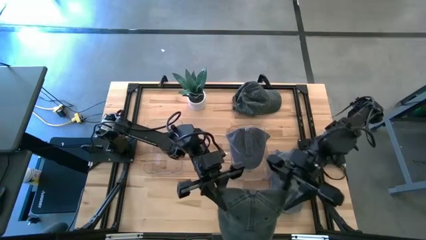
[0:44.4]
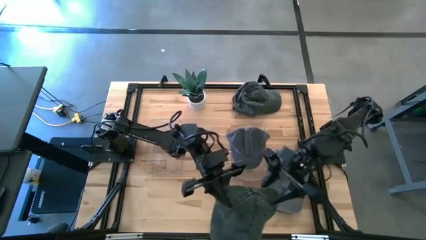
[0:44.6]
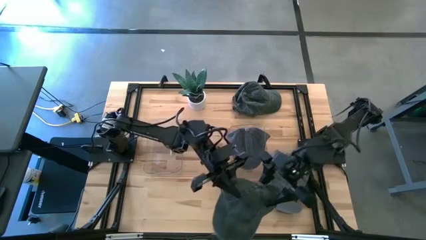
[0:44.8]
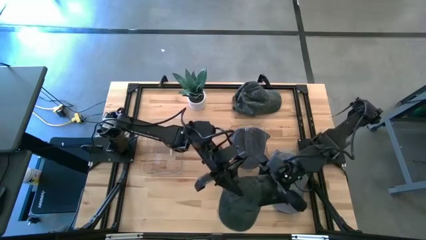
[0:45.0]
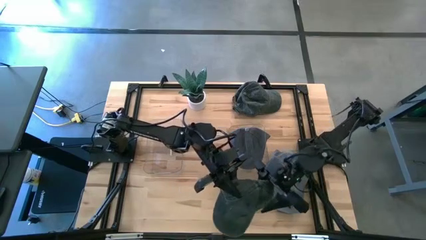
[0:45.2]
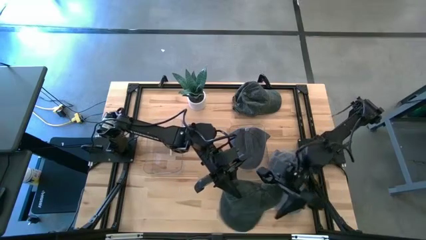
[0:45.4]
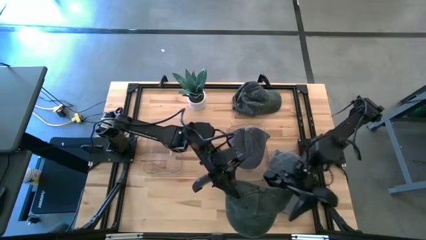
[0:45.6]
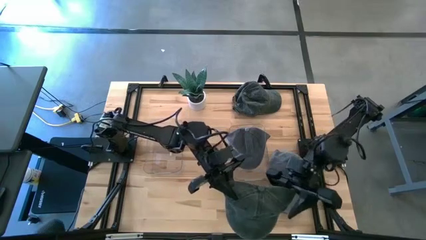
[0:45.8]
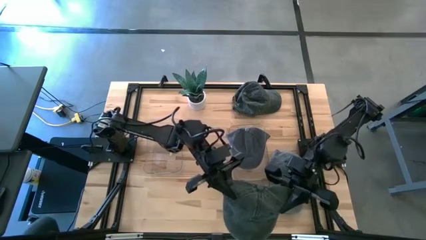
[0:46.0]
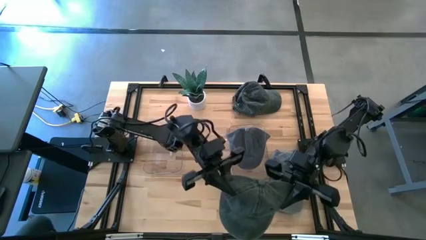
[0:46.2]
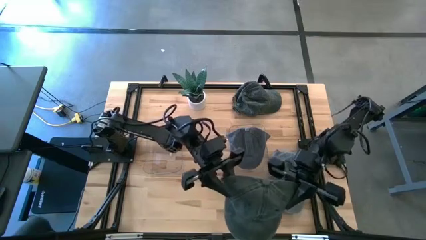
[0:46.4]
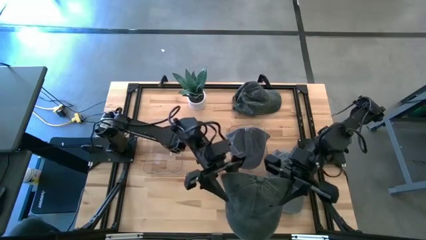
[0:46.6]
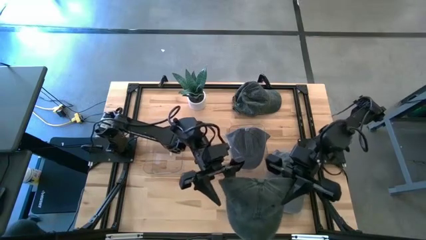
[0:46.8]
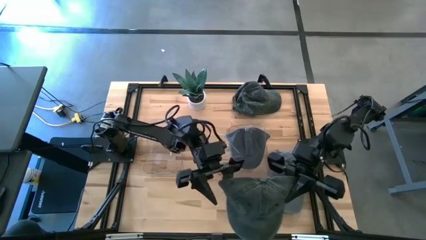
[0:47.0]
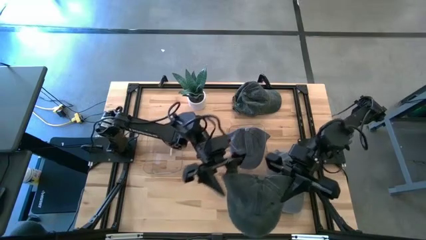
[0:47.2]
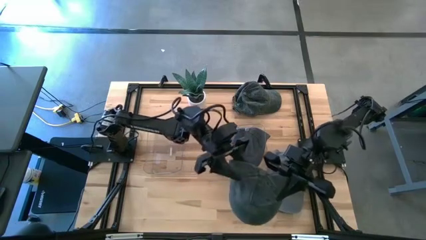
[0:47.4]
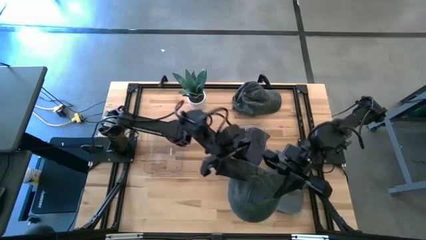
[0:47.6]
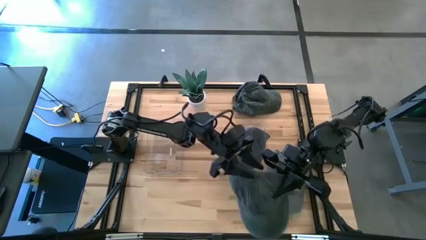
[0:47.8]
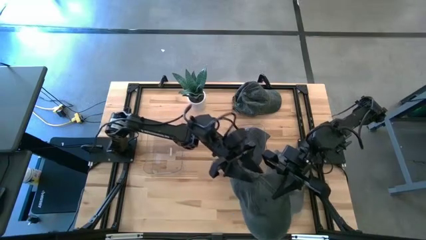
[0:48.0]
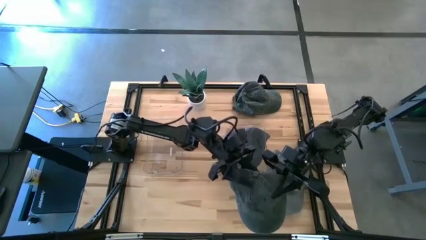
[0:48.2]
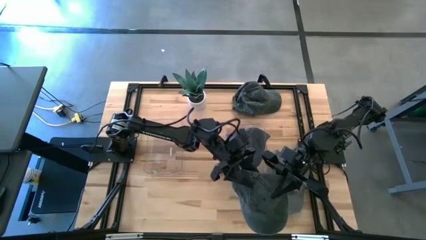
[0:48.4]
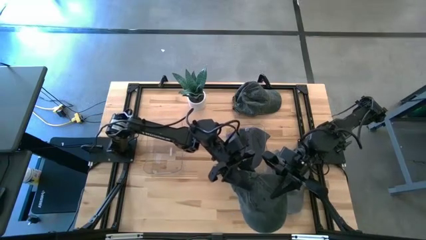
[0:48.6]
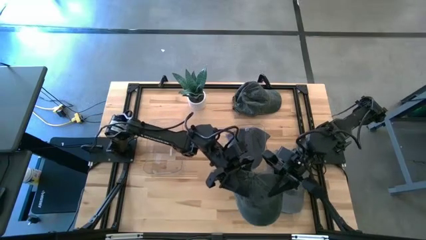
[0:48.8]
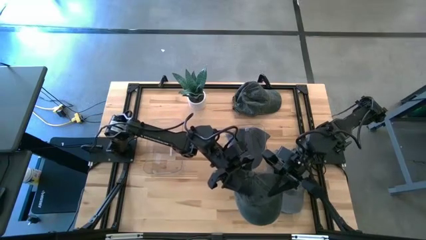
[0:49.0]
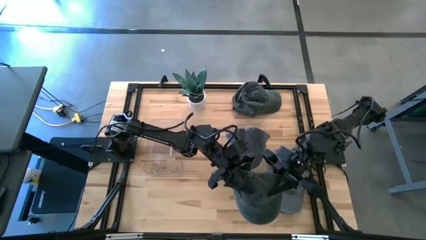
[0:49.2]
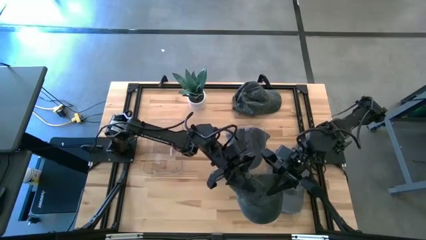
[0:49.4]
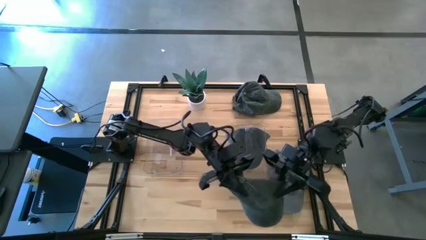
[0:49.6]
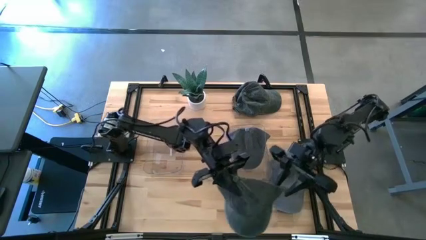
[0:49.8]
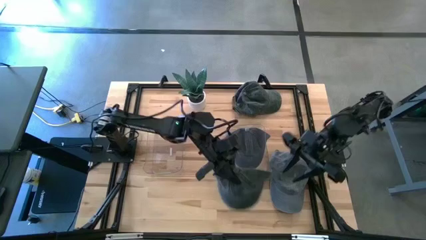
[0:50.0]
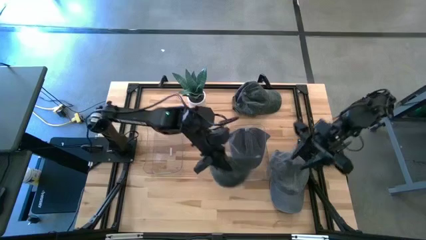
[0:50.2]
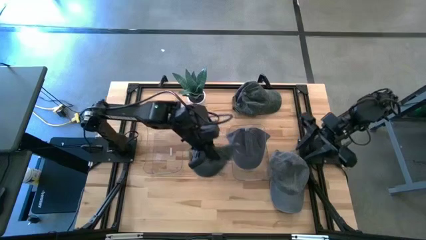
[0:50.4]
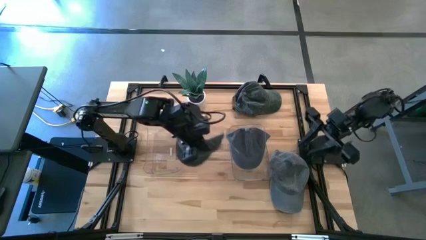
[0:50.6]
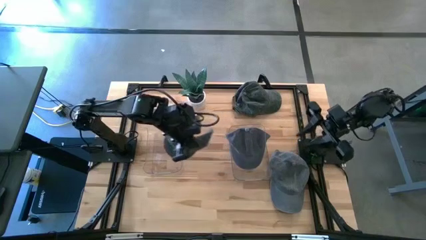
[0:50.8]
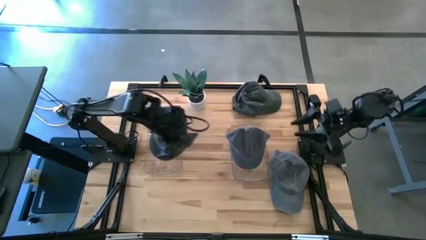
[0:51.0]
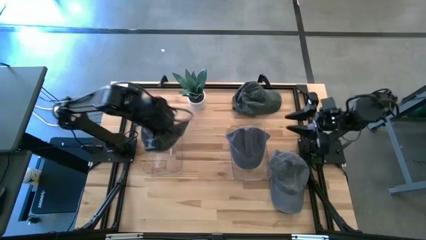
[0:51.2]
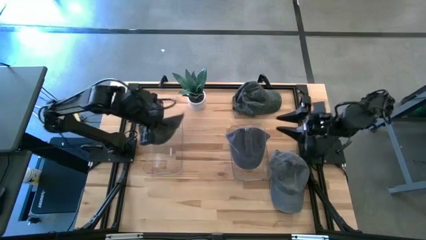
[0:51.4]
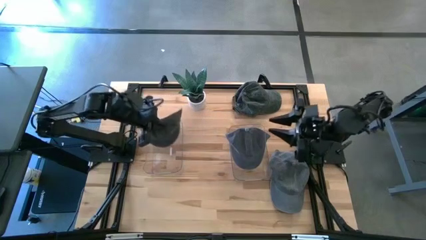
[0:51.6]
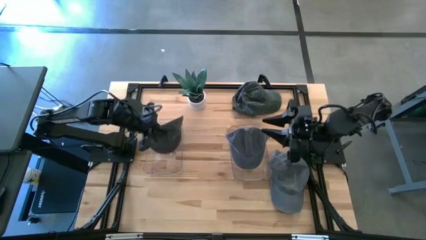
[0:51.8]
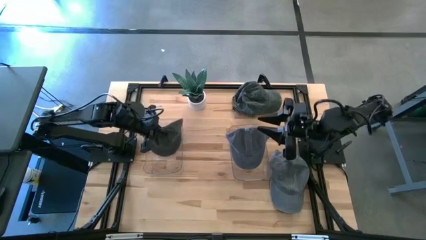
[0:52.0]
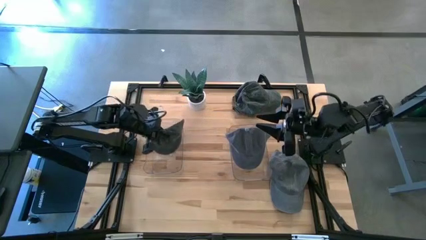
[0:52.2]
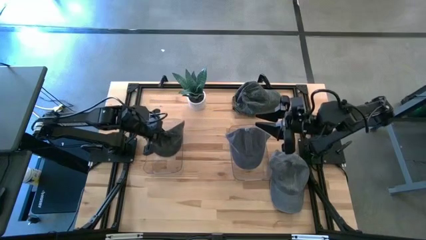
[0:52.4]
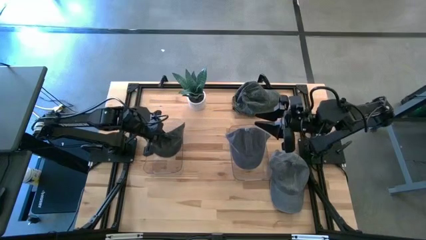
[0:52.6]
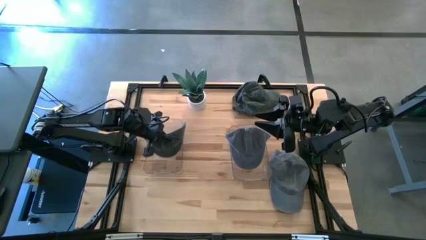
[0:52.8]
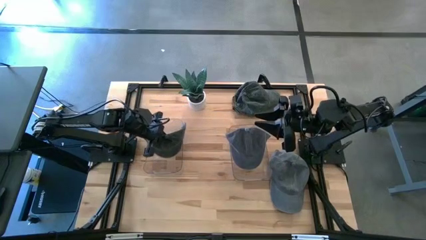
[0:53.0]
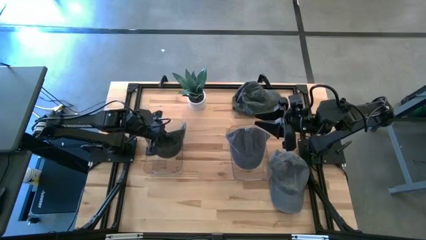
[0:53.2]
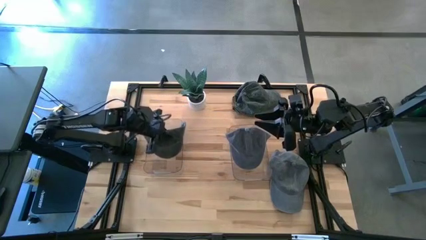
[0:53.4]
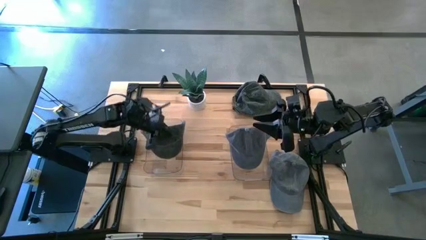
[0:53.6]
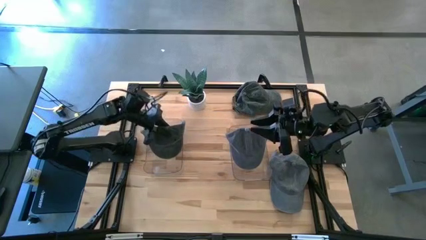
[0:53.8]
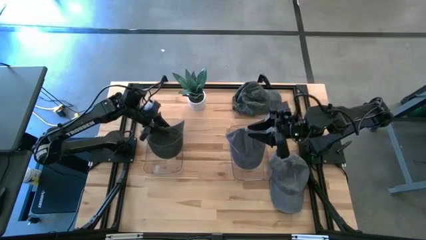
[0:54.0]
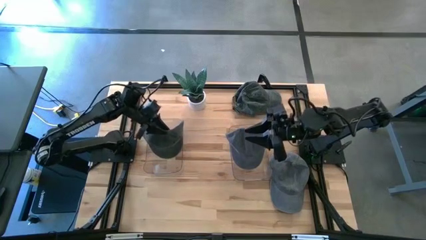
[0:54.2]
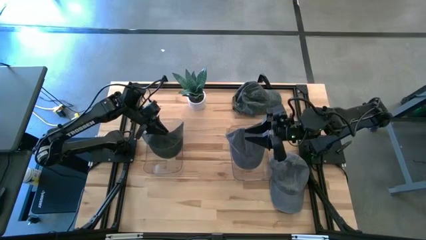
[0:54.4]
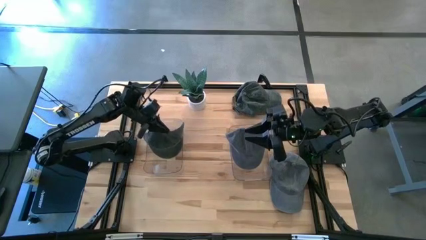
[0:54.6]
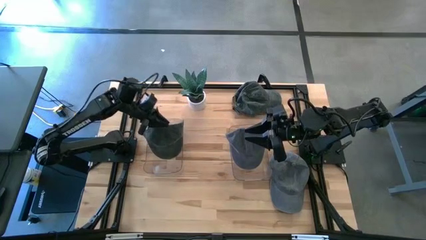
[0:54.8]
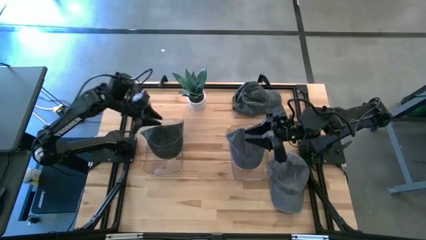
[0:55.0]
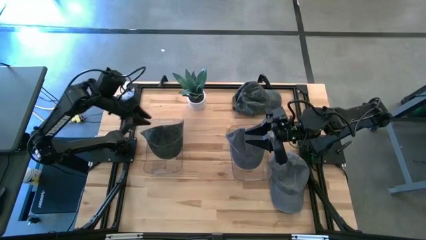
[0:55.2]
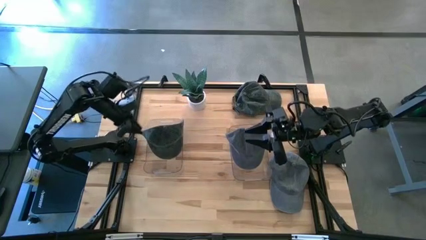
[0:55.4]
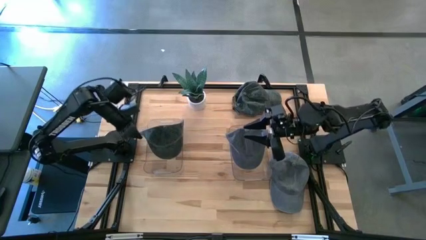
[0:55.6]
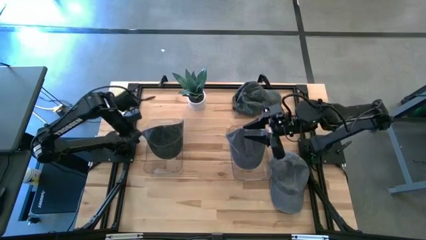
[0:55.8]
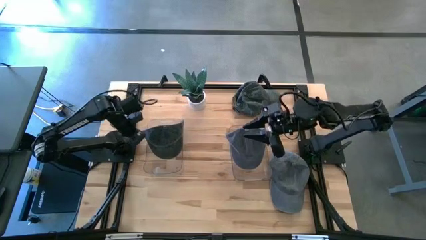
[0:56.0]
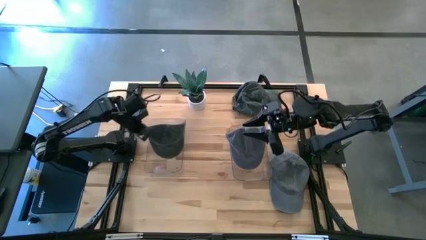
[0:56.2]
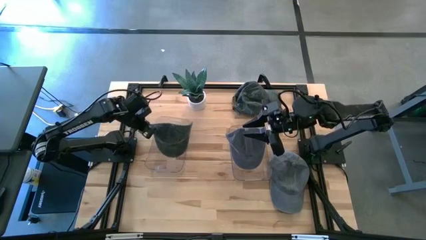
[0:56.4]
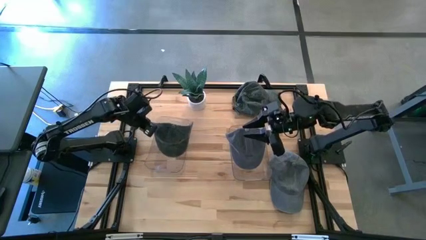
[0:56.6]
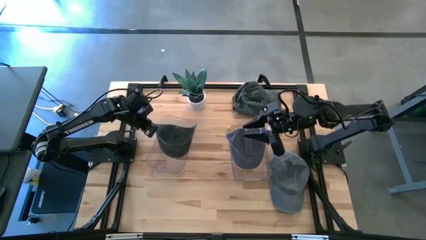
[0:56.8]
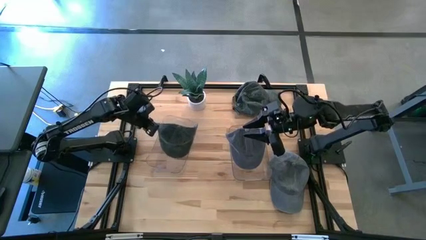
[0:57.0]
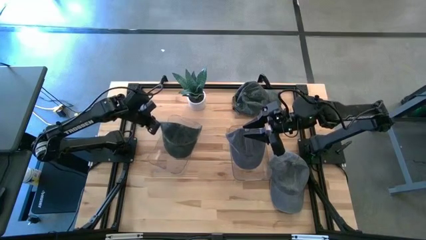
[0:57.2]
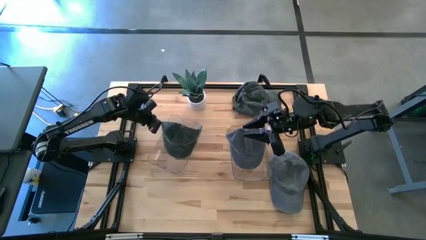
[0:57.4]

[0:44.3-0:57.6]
Task: Pick & Place hat
Put the green cap into the left transparent bin

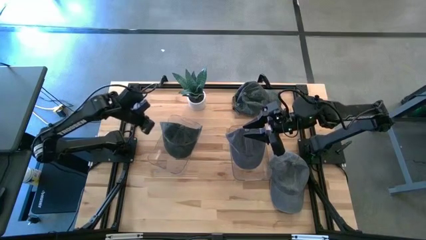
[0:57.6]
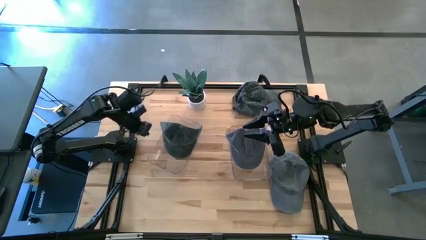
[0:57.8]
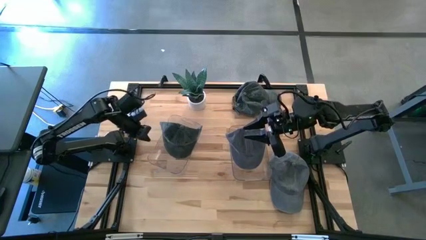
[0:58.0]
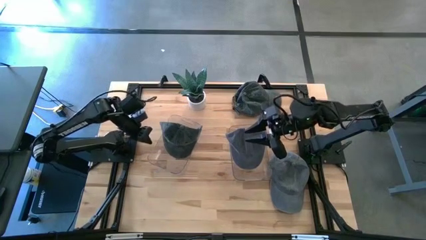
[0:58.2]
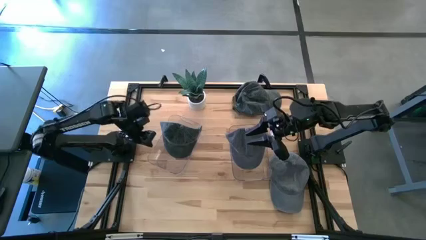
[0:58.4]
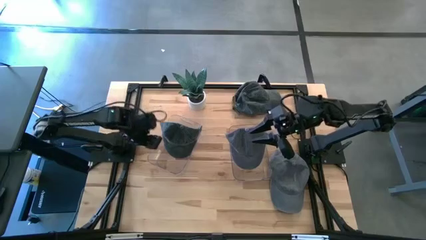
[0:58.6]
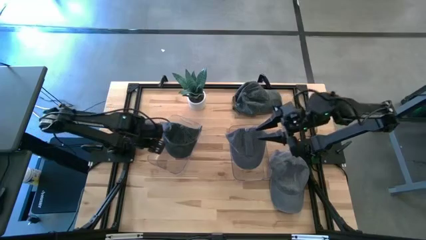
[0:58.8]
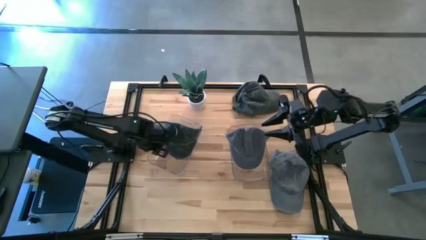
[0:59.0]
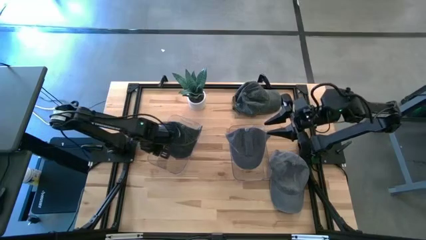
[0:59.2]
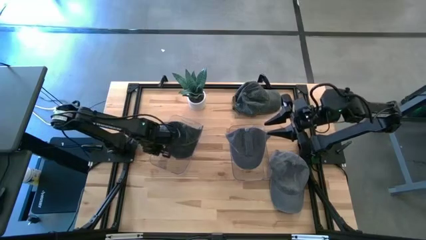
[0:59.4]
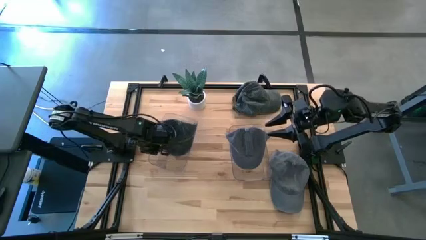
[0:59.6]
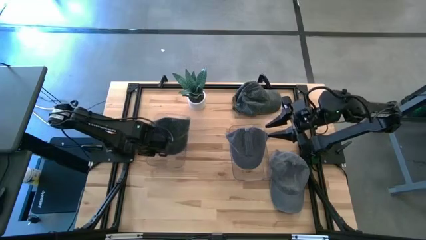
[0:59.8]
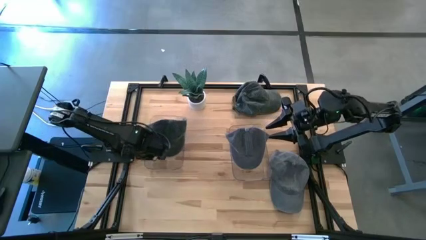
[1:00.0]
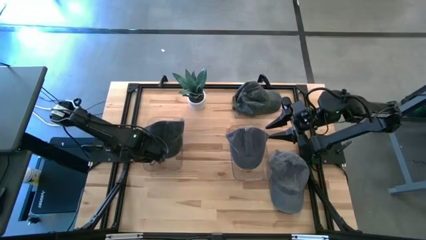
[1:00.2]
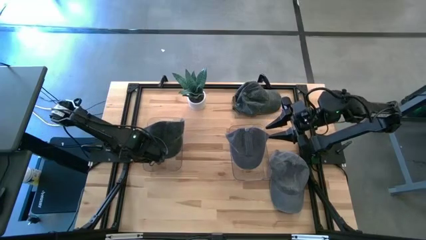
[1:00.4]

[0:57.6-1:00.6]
Adjust the transparent bin
